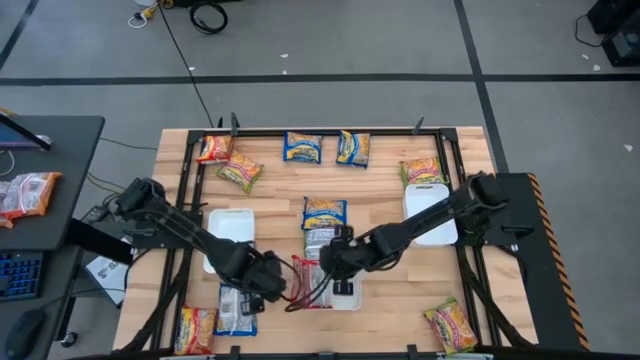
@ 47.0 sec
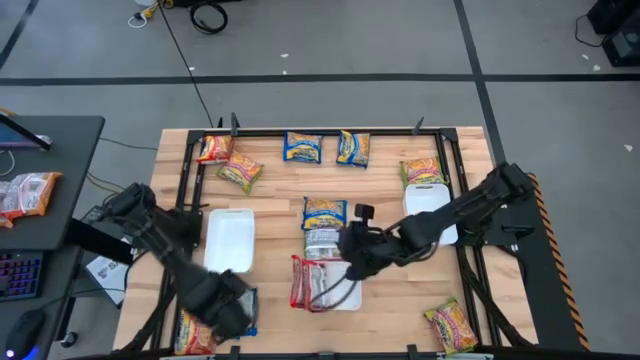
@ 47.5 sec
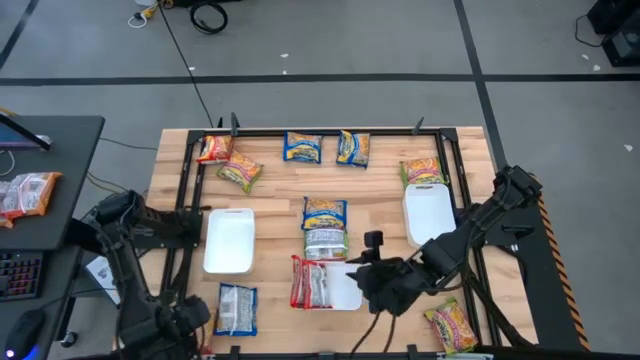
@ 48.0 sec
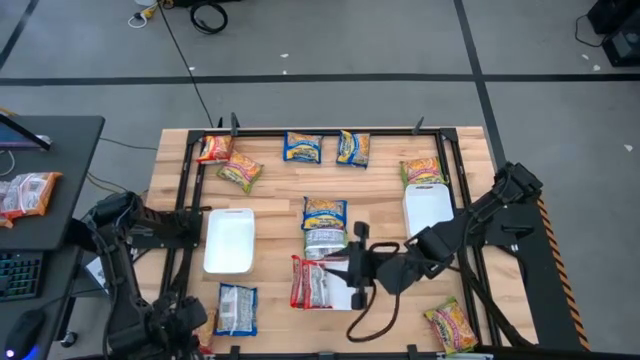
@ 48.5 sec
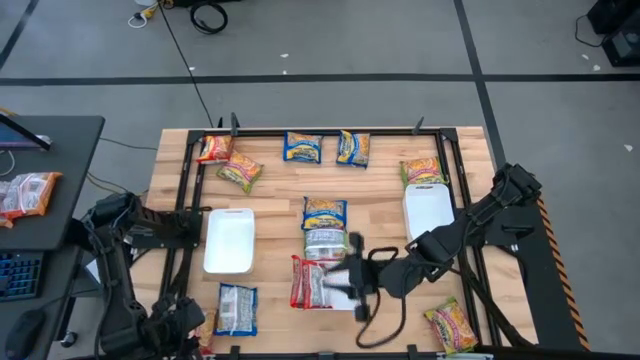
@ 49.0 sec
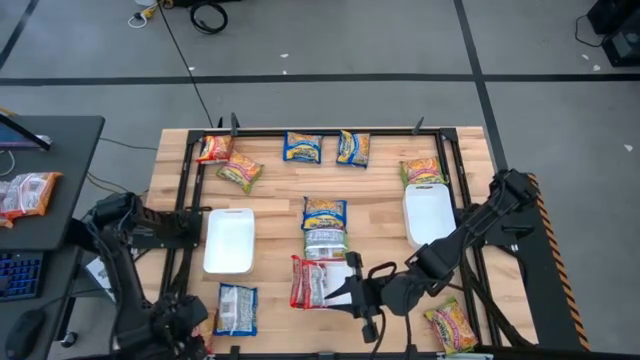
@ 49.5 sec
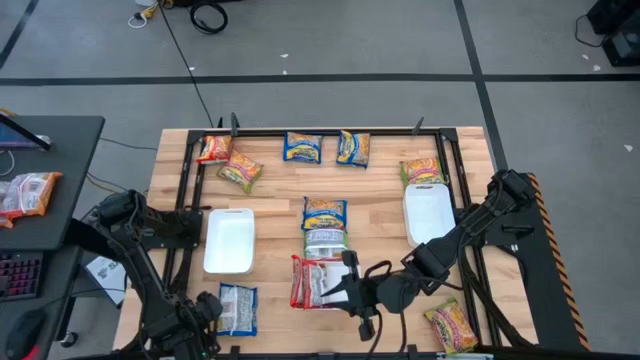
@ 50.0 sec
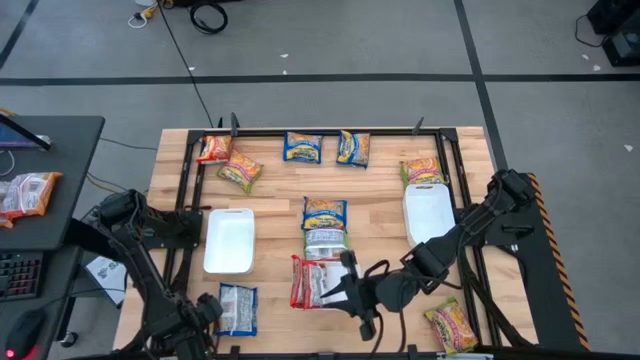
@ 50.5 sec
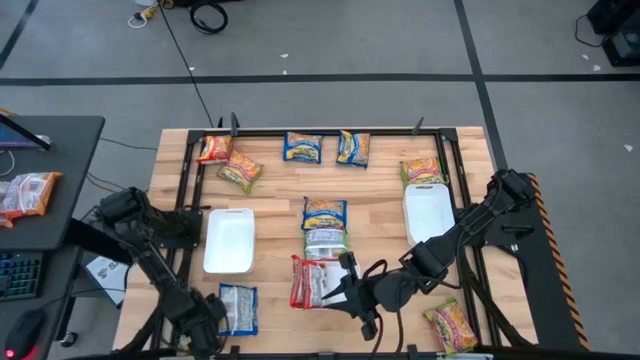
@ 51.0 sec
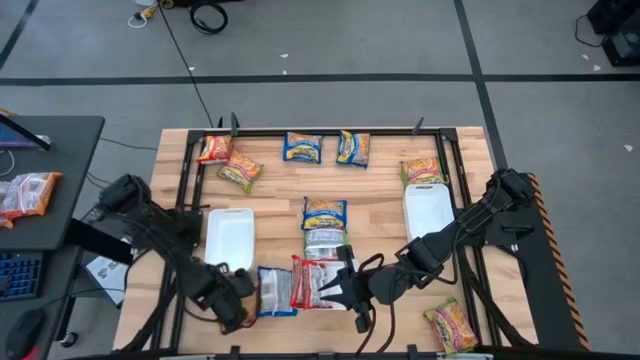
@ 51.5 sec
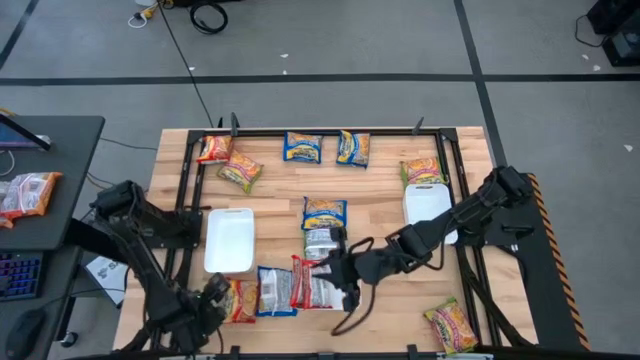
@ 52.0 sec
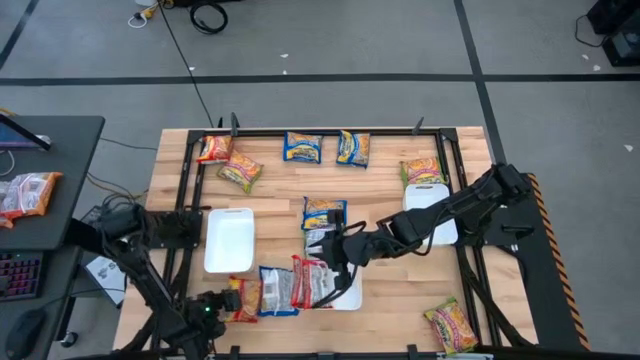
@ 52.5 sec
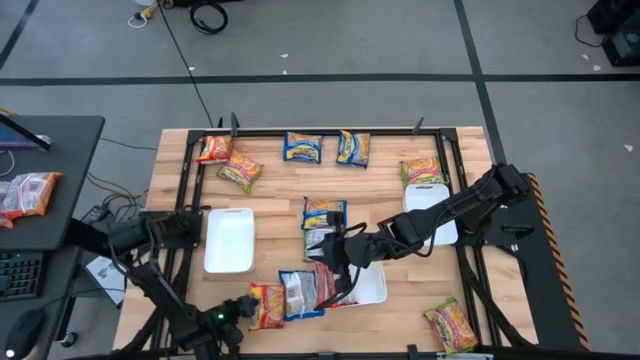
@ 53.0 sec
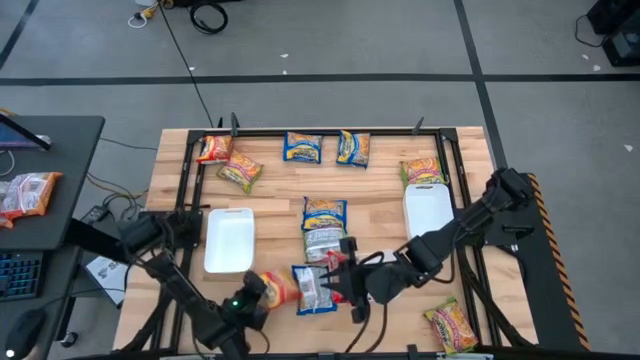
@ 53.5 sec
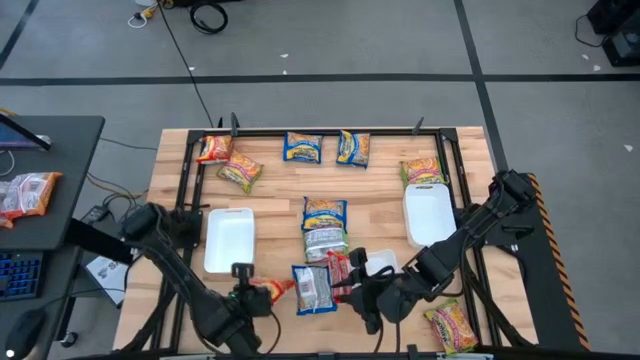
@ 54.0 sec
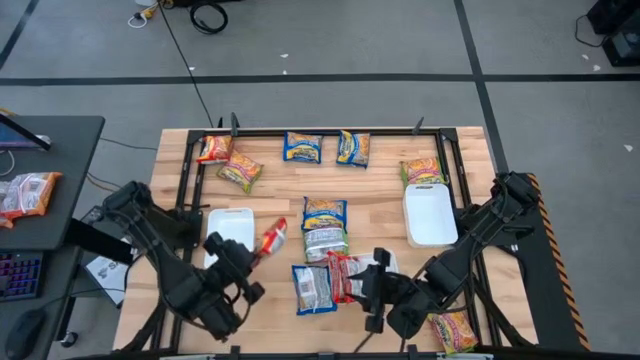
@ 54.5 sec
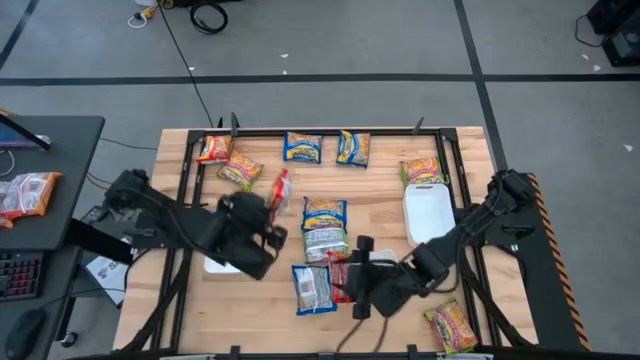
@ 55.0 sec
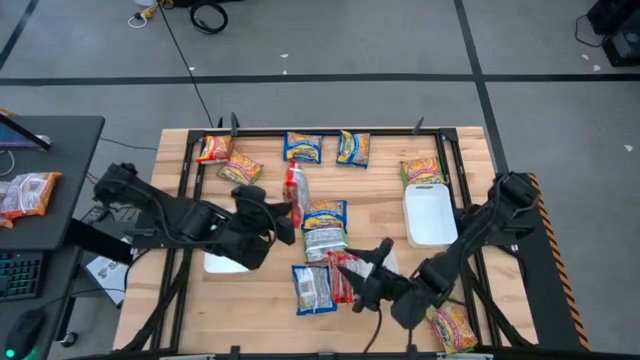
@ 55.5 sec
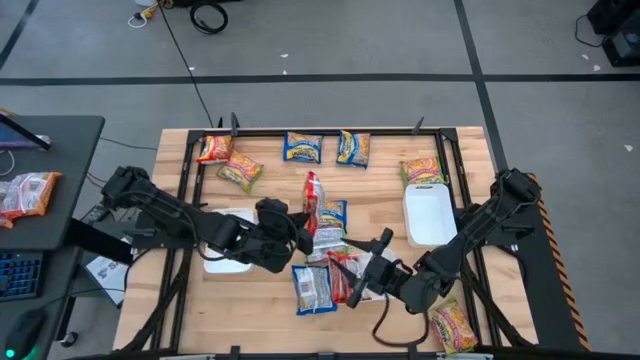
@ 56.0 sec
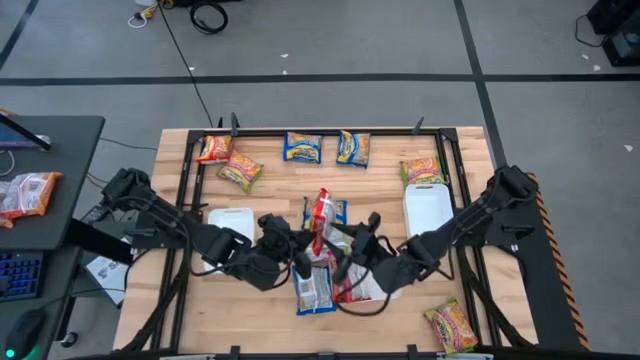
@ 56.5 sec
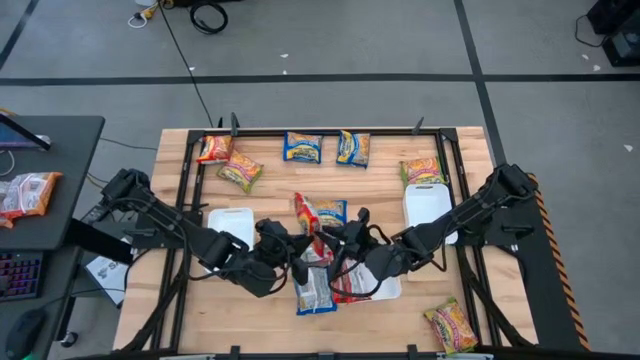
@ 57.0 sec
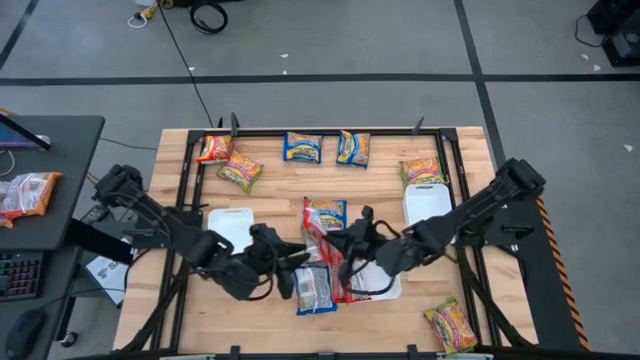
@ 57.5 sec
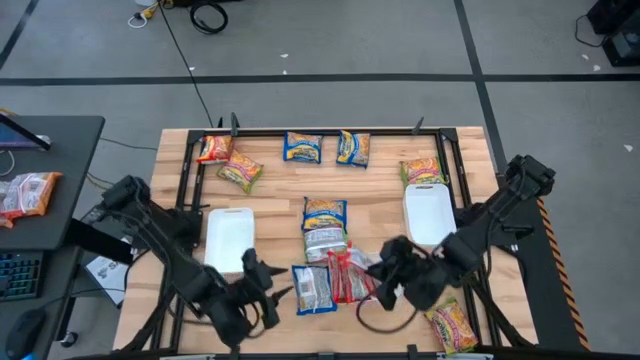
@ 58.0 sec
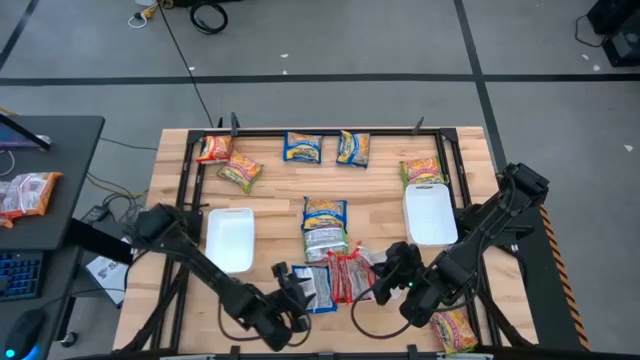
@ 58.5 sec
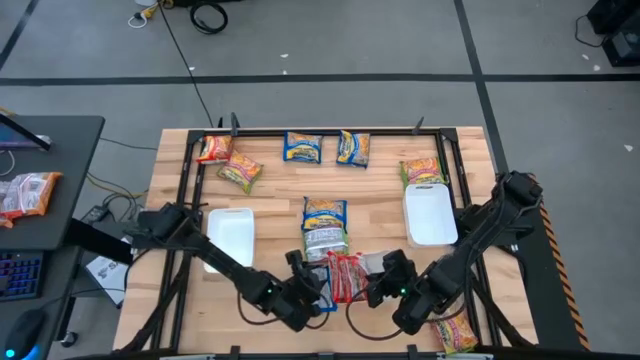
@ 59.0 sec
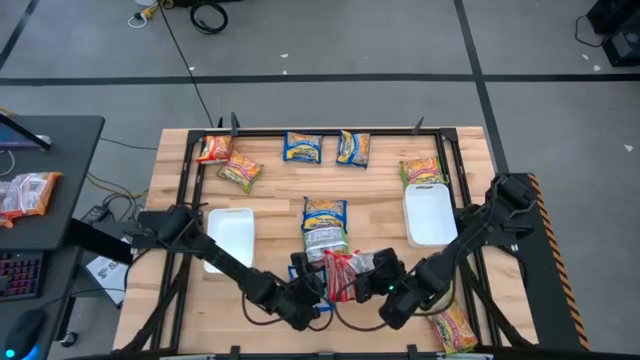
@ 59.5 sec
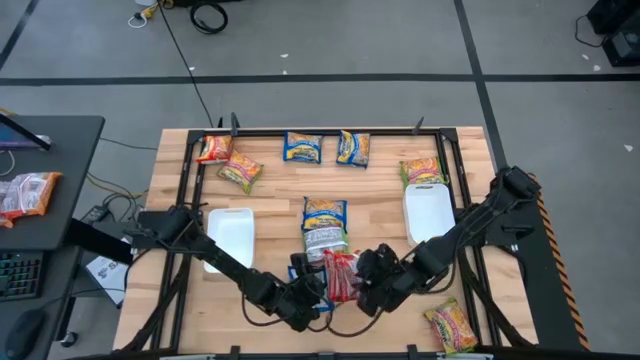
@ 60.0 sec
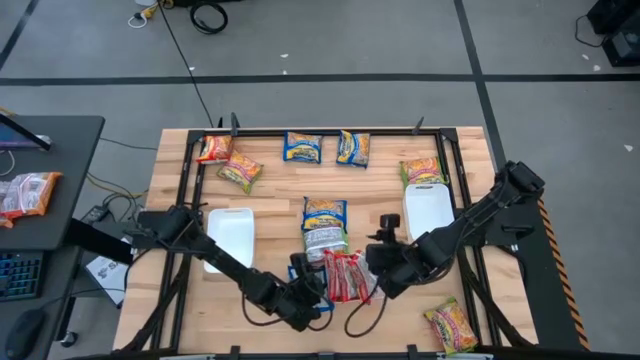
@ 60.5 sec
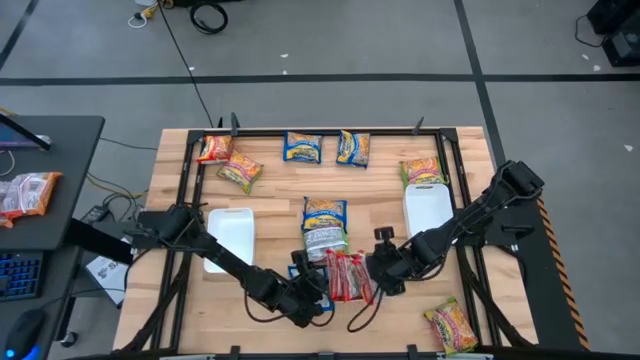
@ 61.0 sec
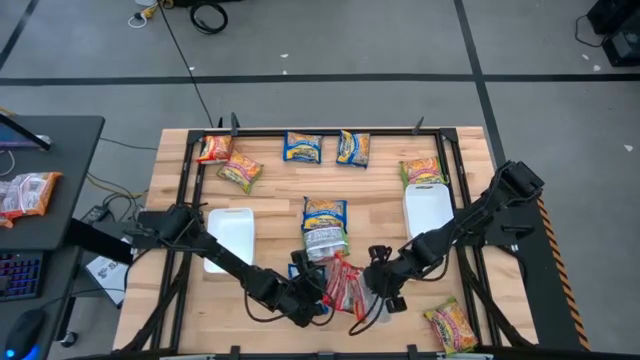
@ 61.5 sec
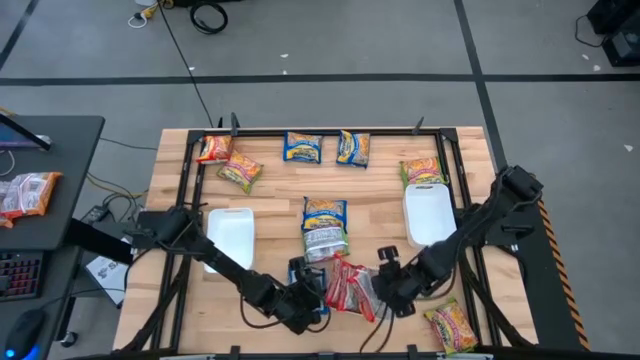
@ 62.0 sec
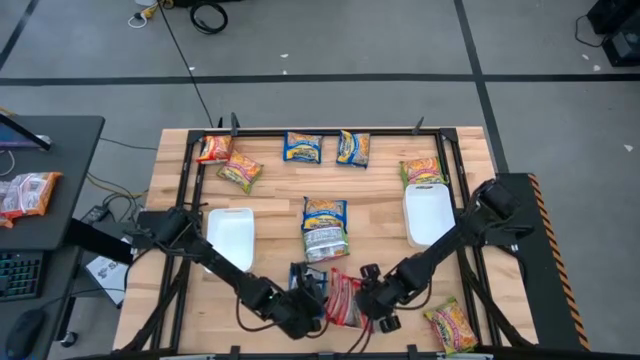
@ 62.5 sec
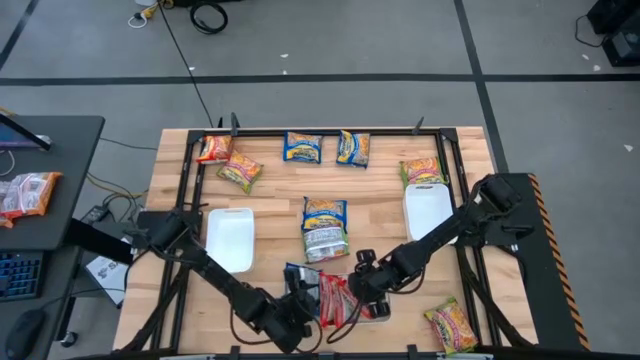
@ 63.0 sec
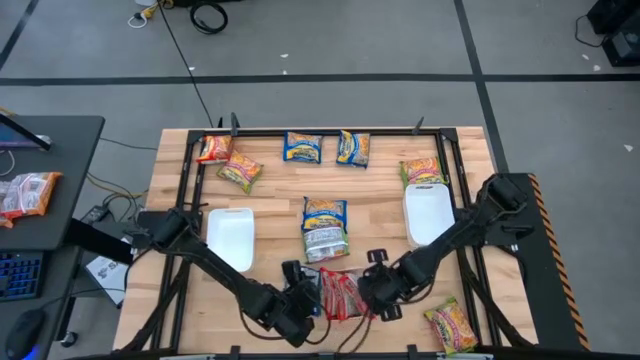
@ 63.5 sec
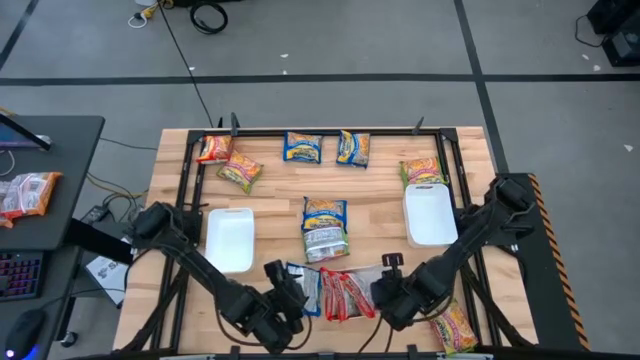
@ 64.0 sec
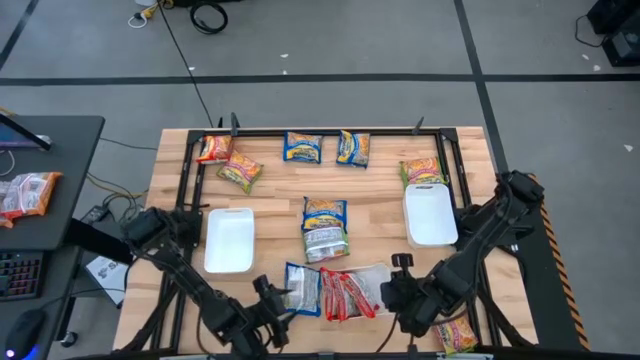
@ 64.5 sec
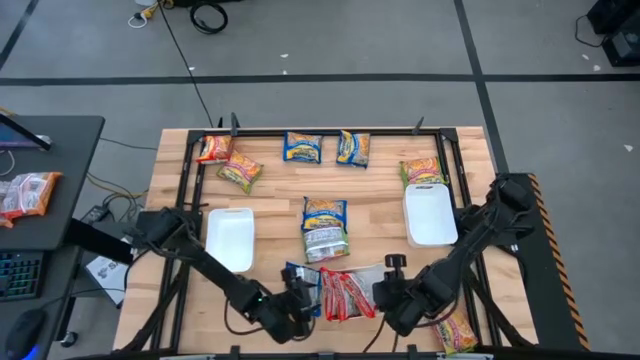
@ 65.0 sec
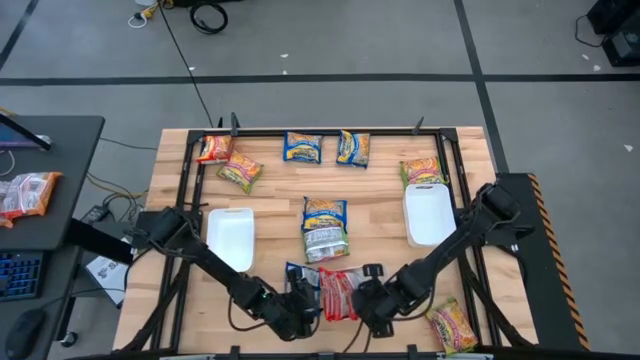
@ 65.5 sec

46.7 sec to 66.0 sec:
Task: Sort Maruchan noodles
Put the bottom red noodle pack into the bottom white bin

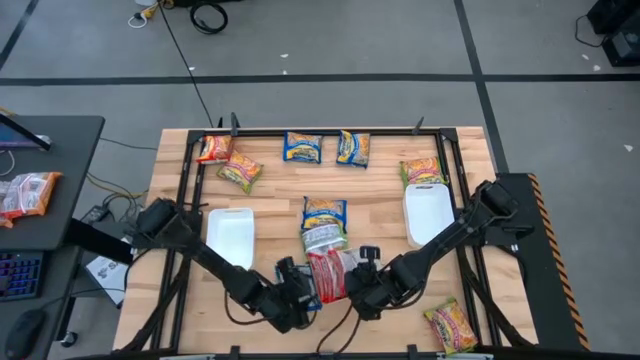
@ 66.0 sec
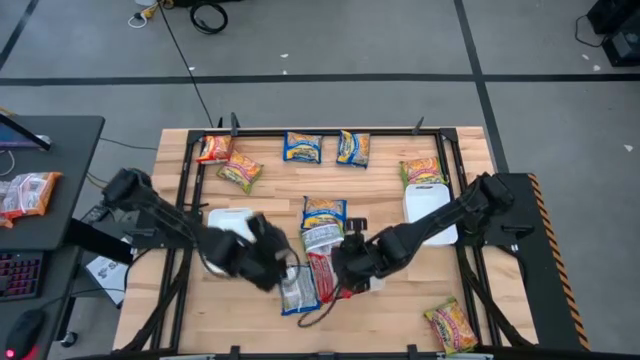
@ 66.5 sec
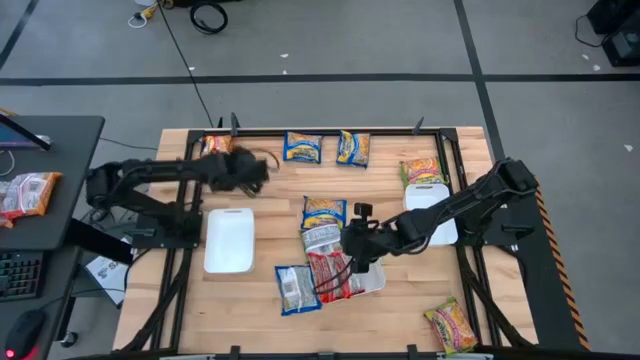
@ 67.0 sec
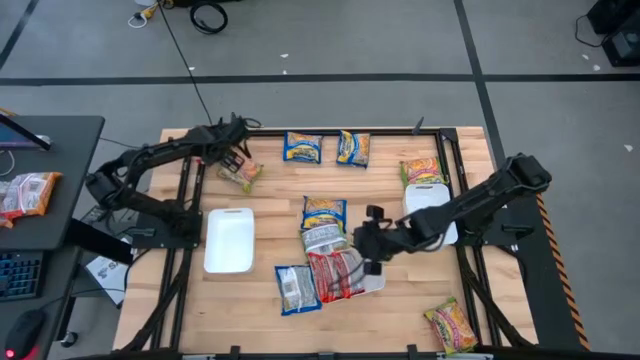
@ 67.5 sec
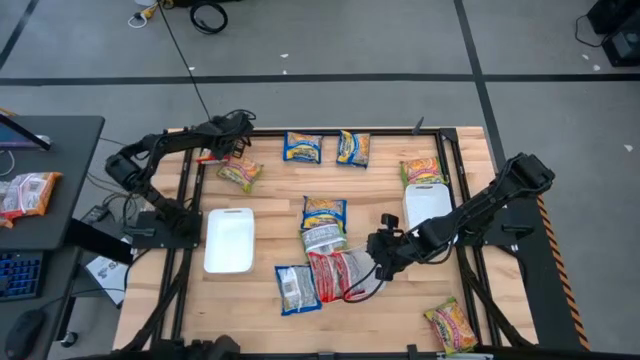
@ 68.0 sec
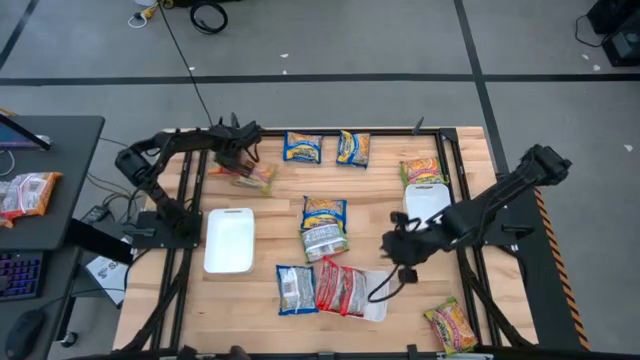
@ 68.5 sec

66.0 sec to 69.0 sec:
Put the red noodle pack into the bottom white bin
